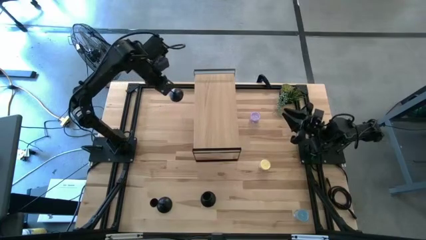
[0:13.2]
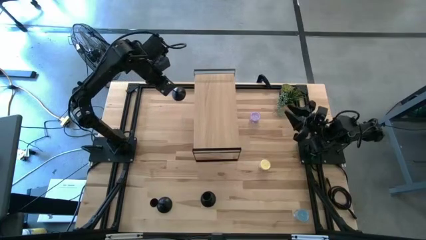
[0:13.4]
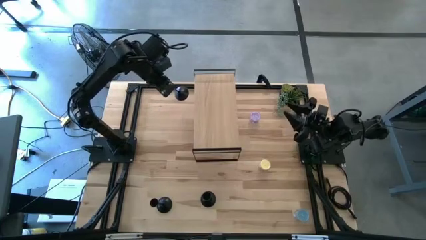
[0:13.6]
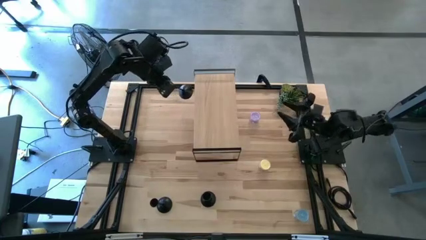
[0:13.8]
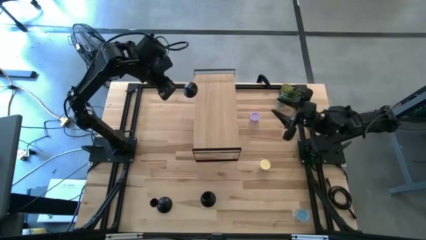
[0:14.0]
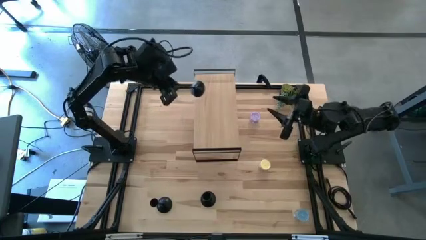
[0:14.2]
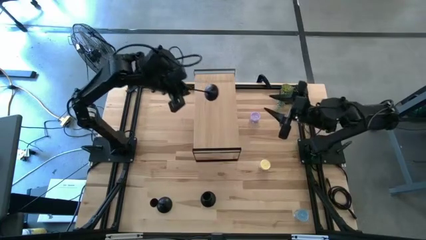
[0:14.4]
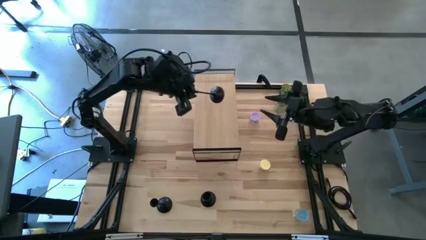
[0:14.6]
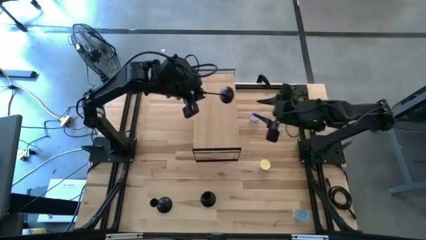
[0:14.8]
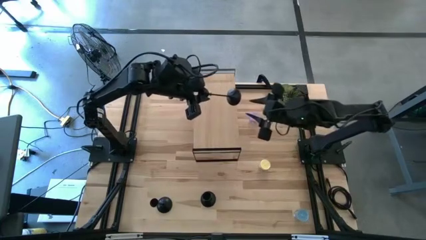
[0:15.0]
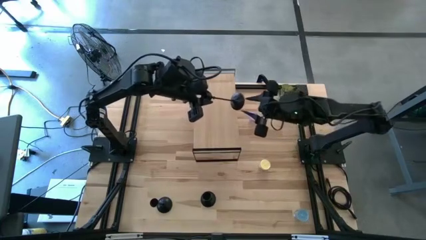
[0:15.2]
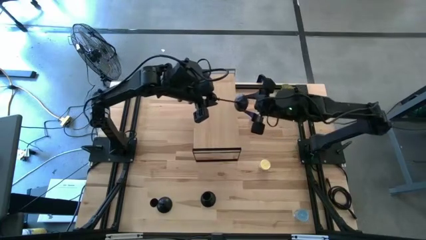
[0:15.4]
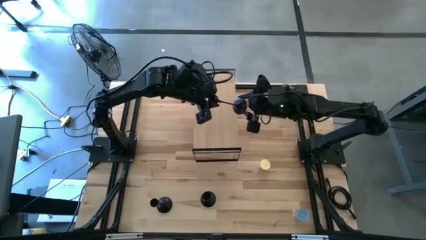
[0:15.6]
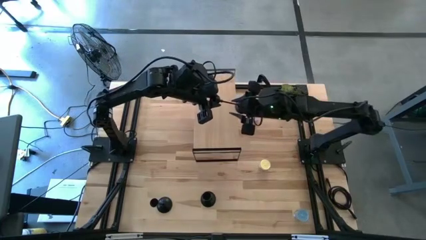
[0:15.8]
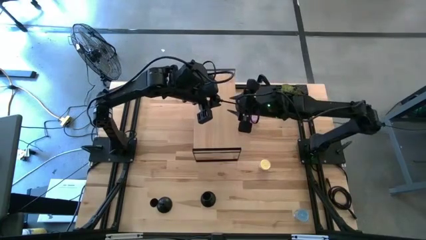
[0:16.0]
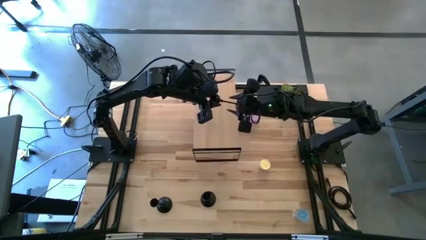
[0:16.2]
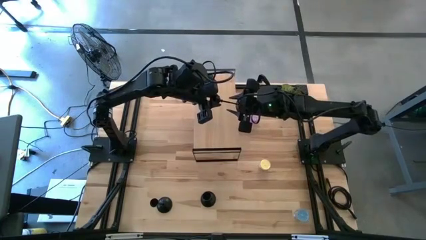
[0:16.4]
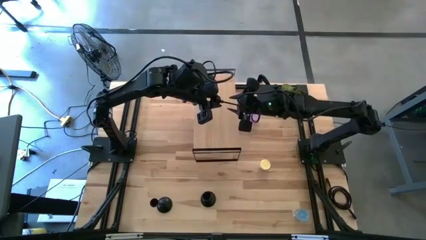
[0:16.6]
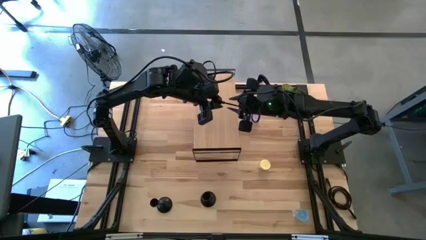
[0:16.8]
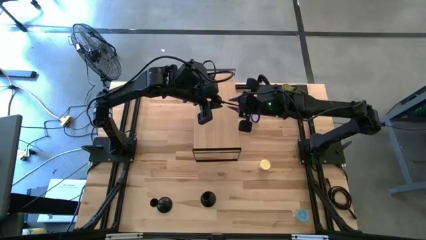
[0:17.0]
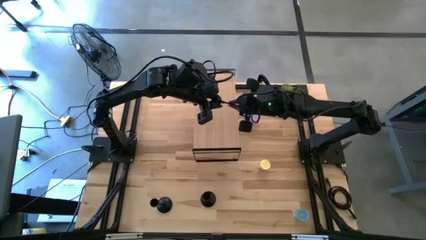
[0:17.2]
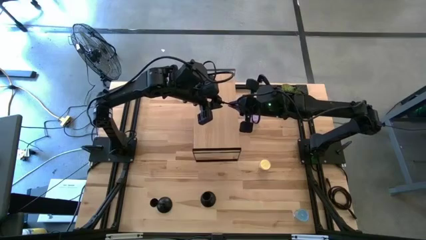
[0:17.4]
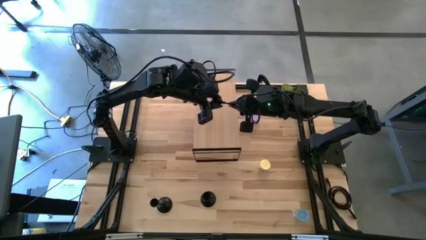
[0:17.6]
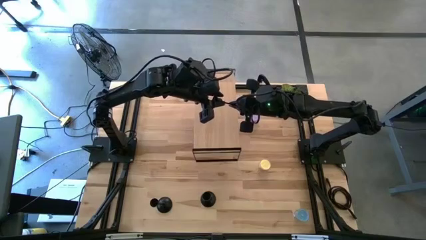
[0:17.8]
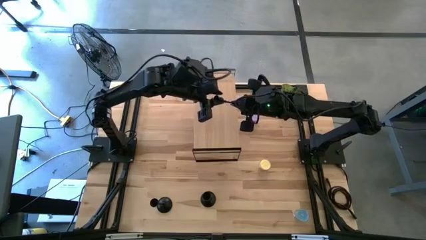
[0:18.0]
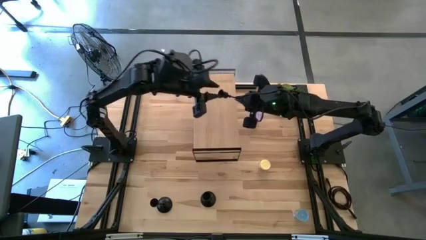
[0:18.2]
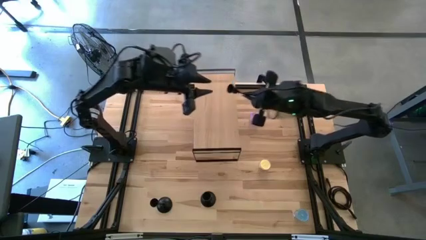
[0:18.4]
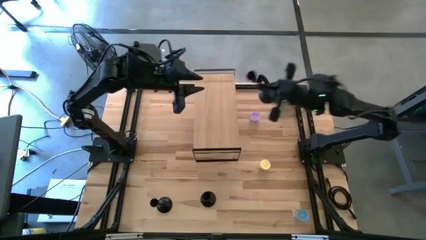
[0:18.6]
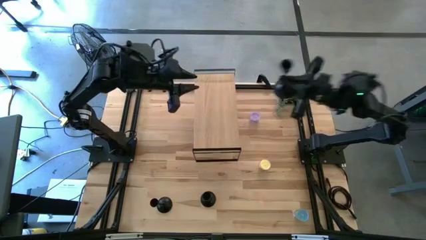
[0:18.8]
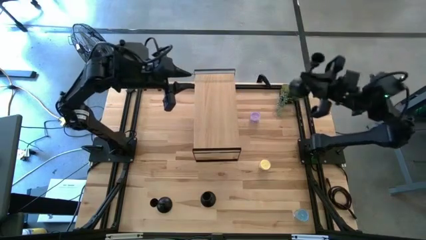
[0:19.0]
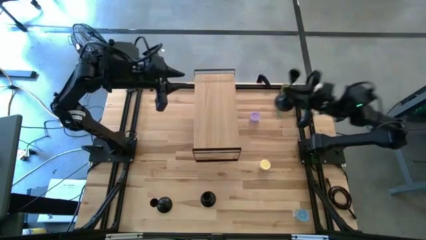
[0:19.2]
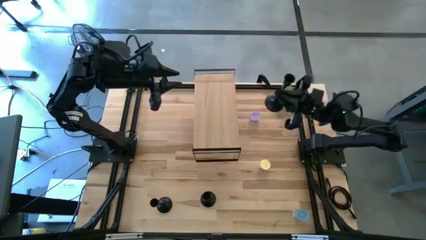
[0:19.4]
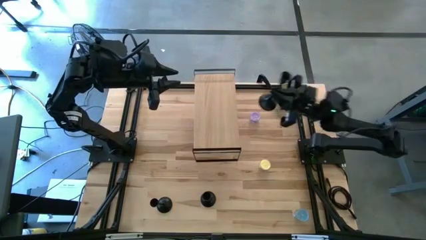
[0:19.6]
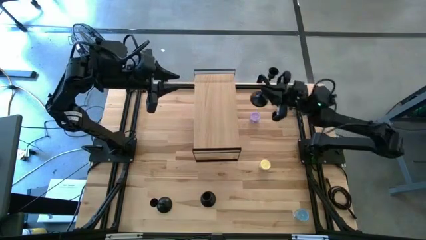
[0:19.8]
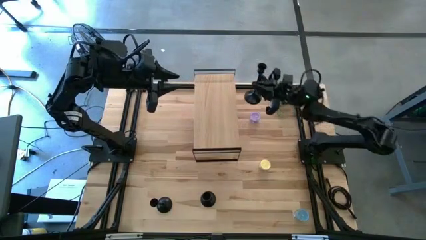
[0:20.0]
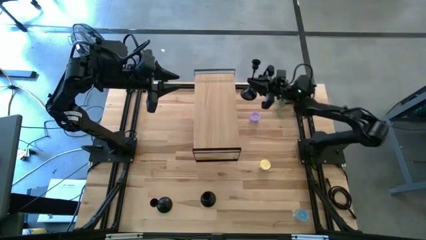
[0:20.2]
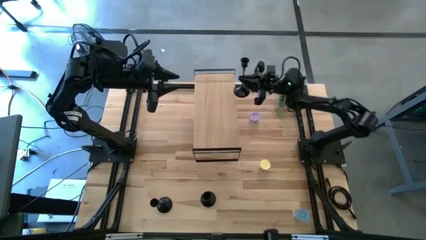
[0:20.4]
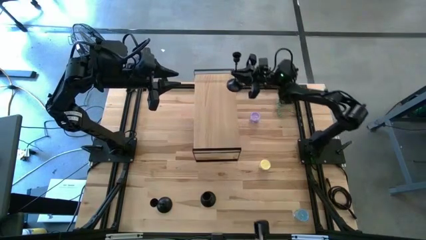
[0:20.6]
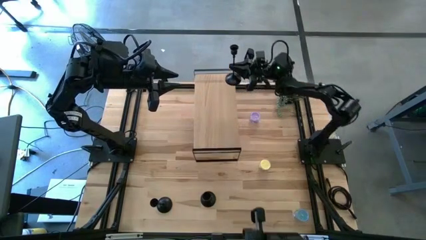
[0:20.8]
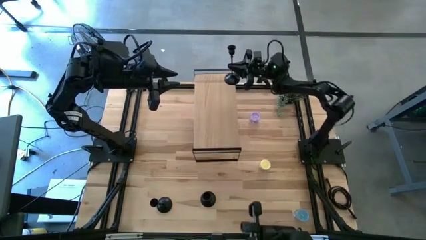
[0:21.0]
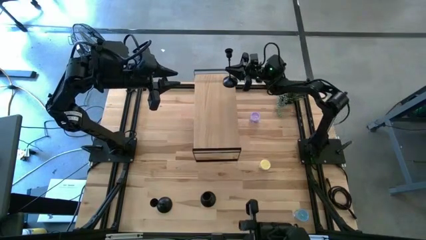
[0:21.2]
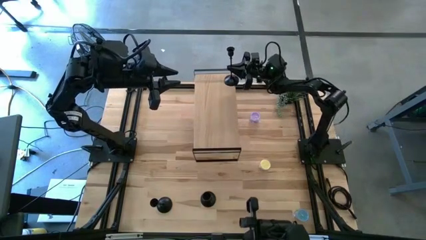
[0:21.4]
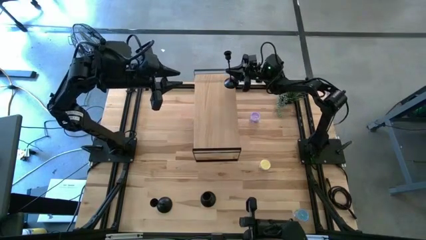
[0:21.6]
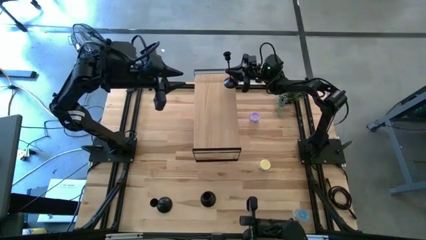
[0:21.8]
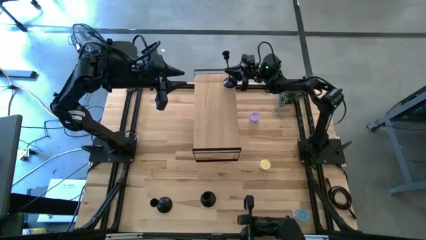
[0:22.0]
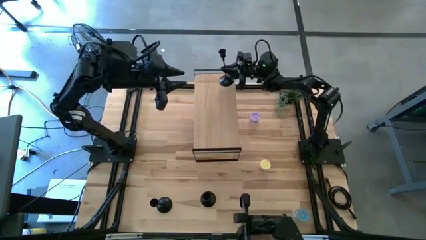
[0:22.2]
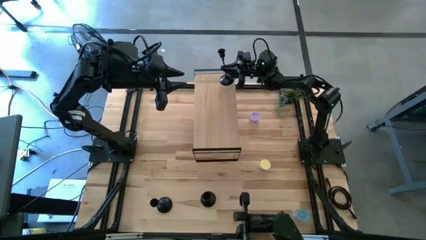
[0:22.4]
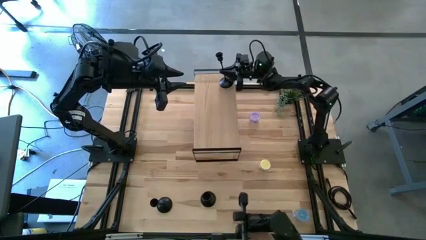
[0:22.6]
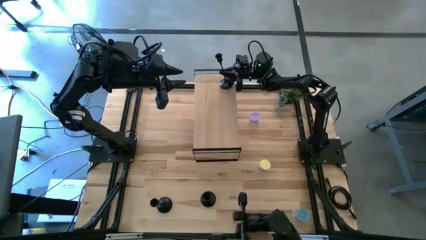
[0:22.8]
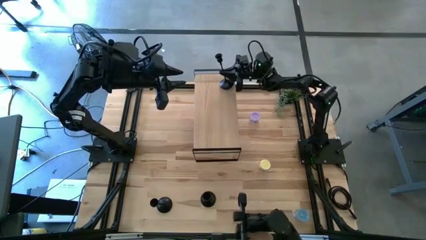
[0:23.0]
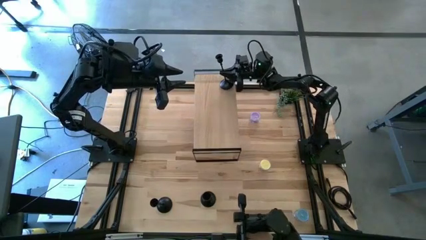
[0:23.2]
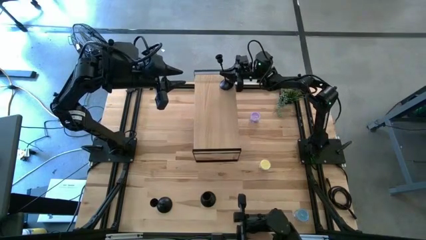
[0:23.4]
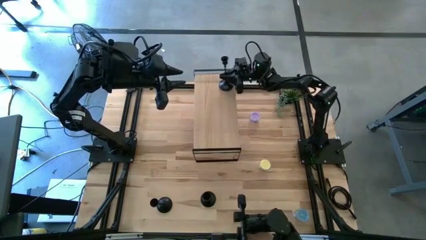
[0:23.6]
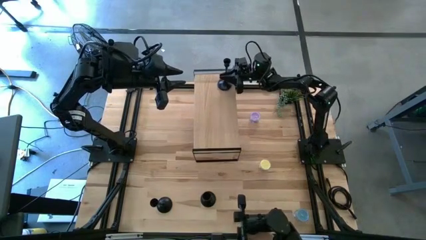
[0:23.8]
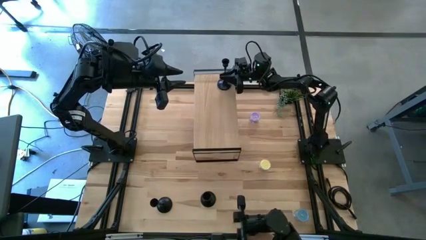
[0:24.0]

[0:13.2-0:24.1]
Task: Pick & Place candle stick holders
Put the top candle holder on the shelf

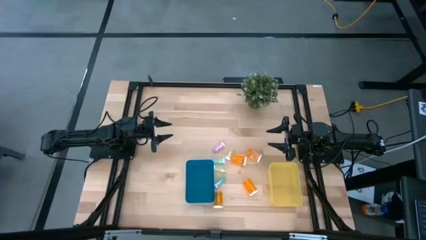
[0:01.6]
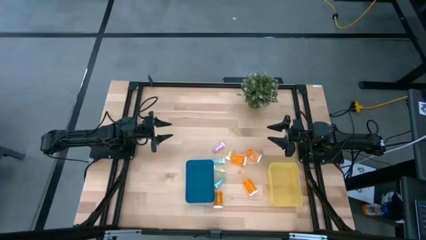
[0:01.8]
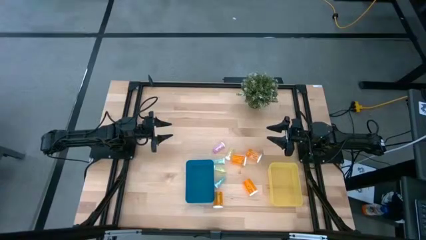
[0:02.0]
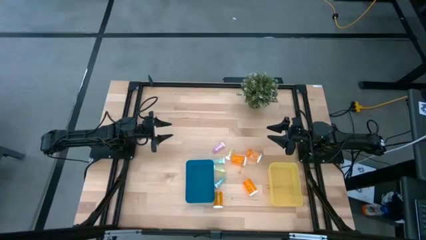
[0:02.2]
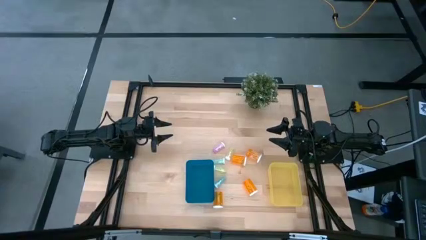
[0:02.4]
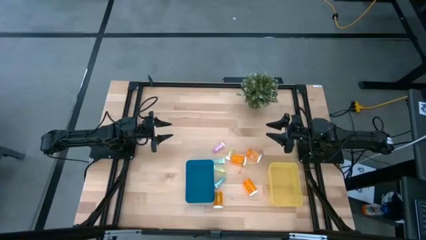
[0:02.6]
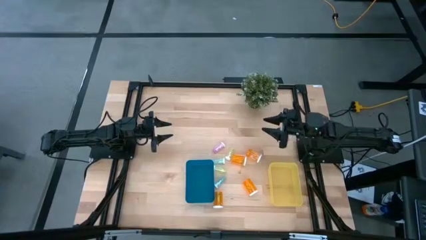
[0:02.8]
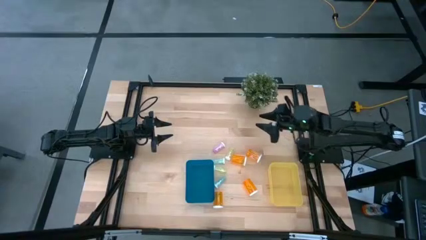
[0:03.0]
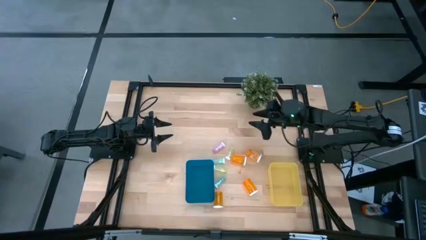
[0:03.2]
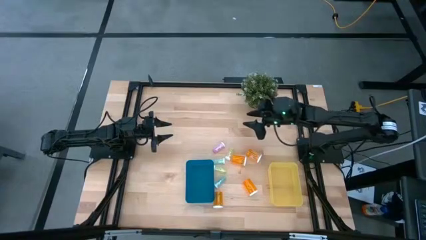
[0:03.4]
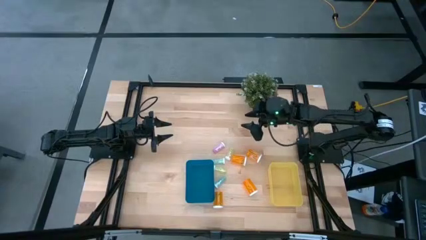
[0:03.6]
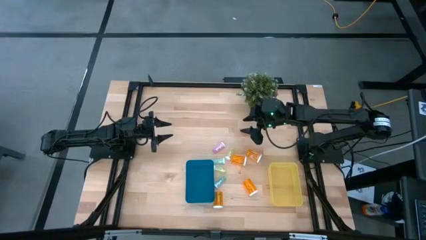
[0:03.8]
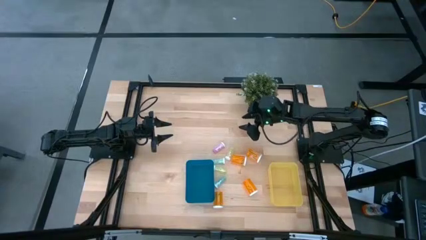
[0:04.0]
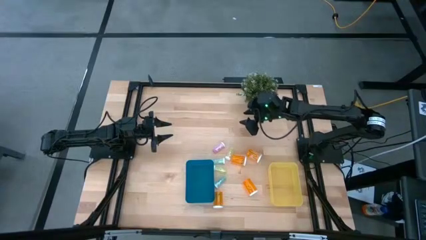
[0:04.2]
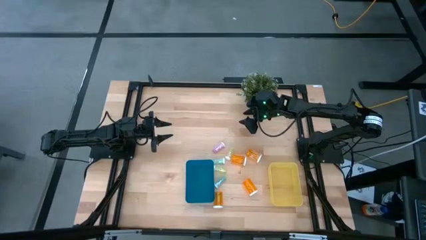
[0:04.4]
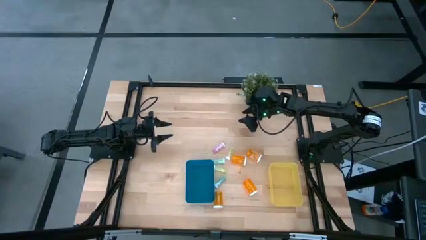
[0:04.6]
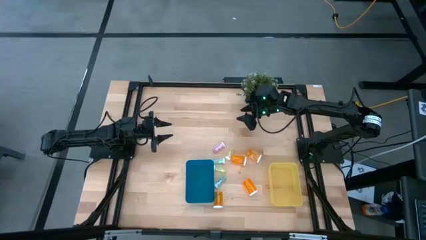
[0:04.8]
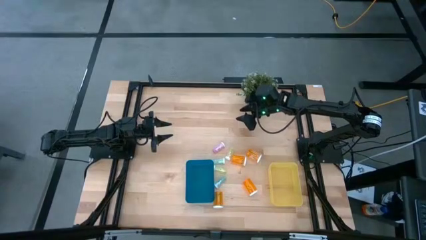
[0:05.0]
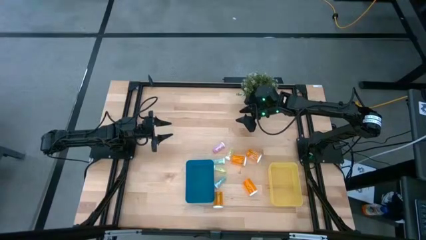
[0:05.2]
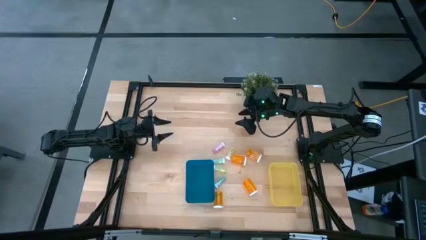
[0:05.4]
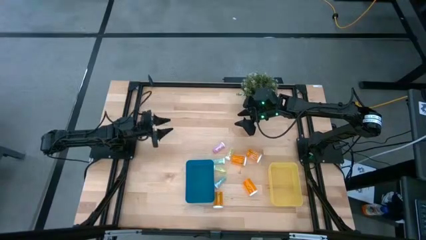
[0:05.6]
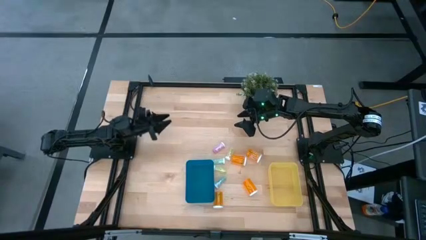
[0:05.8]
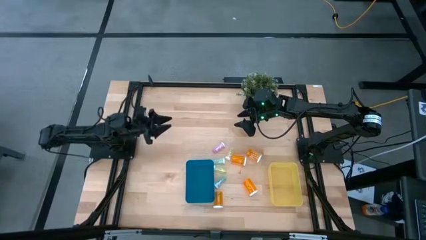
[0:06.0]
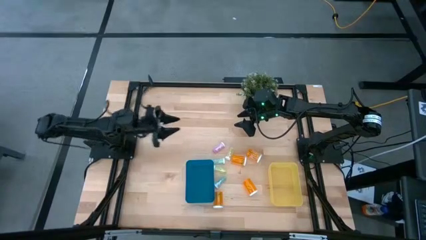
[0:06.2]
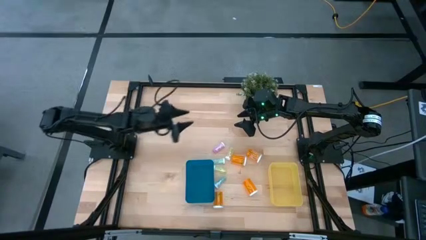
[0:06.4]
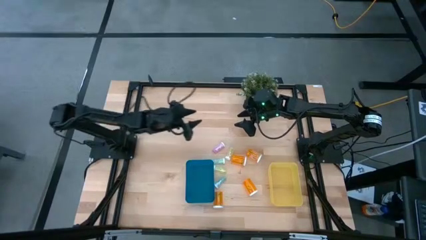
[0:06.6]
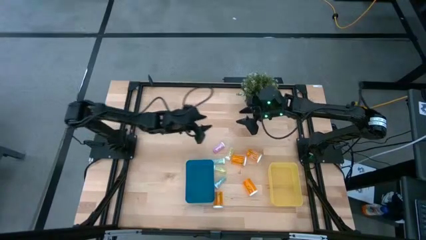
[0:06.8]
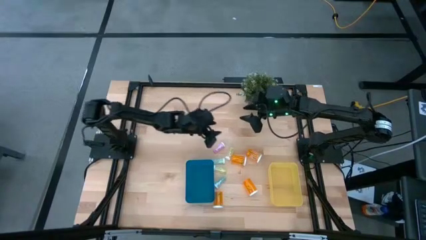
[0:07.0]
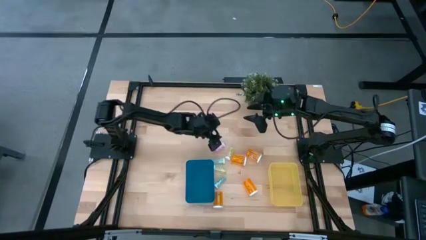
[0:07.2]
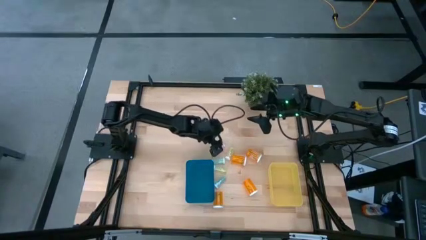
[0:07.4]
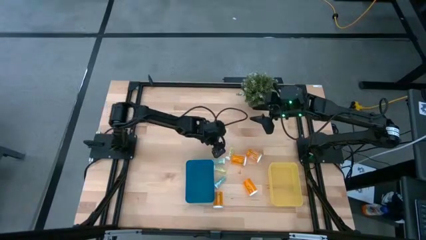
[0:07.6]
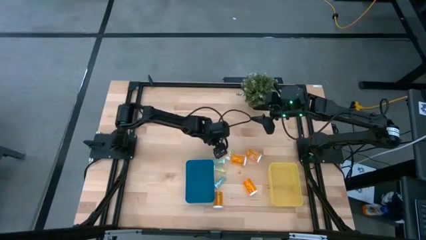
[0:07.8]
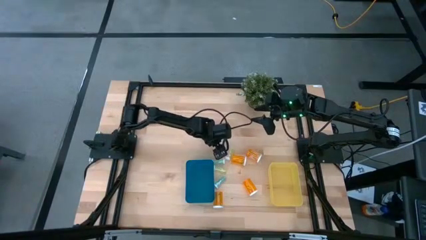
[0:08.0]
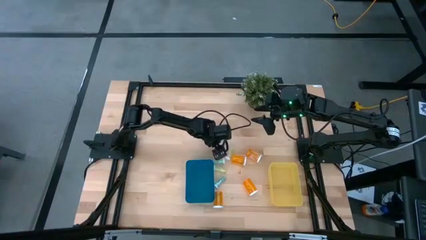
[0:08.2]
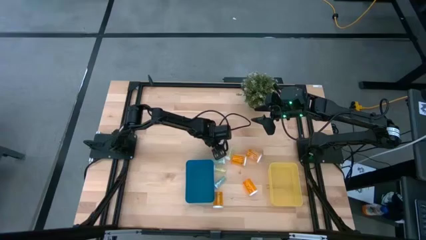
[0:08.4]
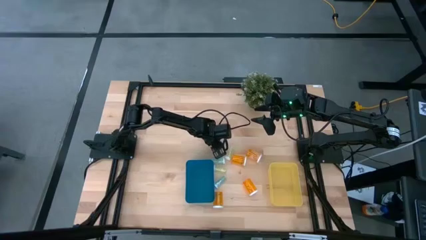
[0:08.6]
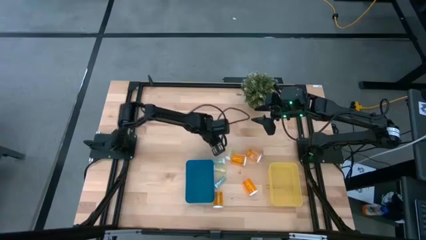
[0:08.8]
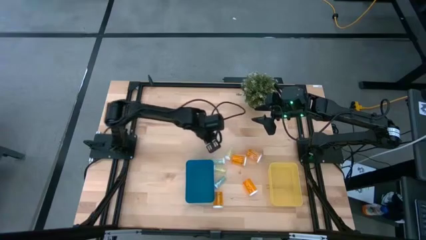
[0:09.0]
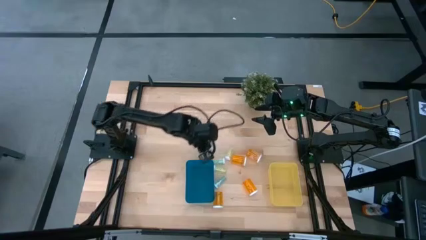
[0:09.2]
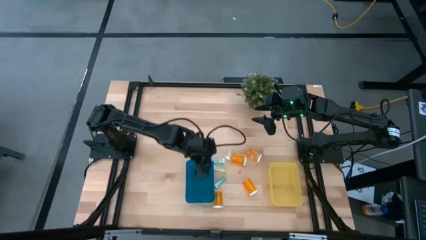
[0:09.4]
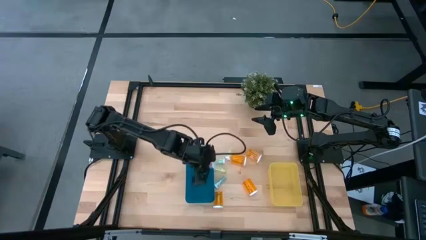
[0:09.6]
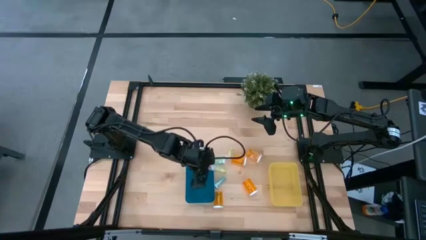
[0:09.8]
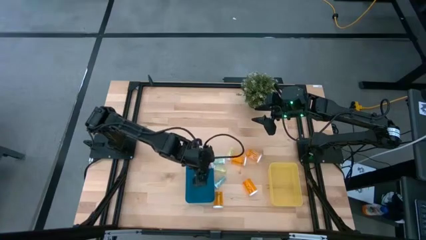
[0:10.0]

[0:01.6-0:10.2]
Task: Pick and place medicine bottles into bin by pill shape (circle, oval)
Put the small pink pill bottle into the blue bin
